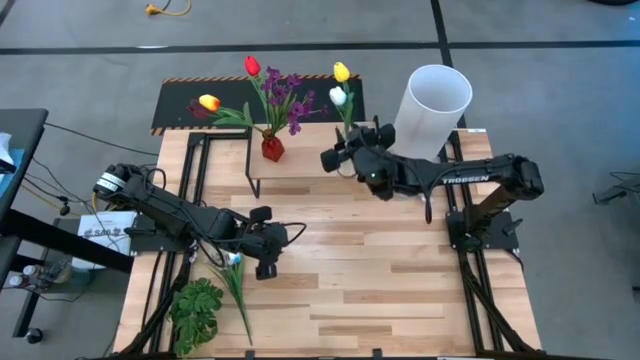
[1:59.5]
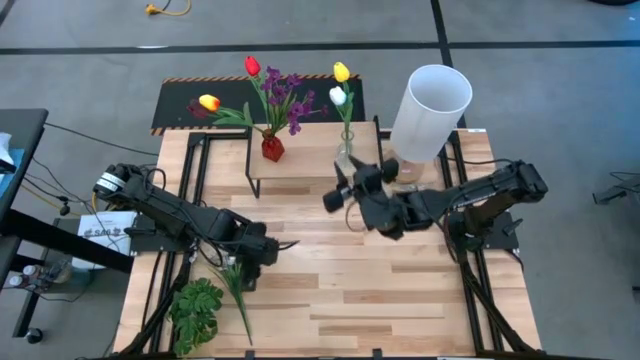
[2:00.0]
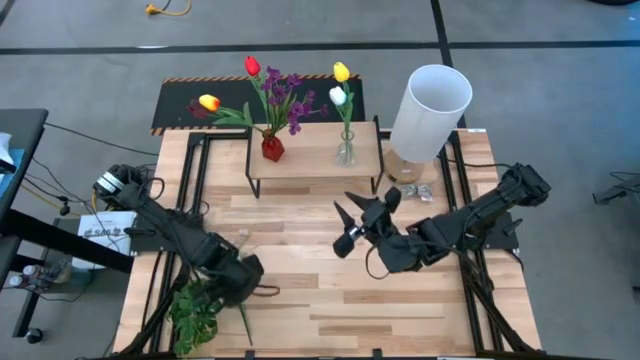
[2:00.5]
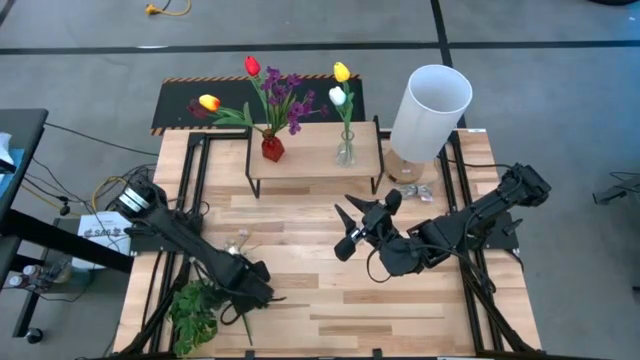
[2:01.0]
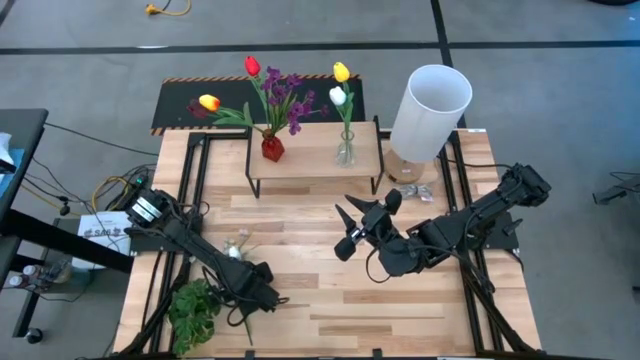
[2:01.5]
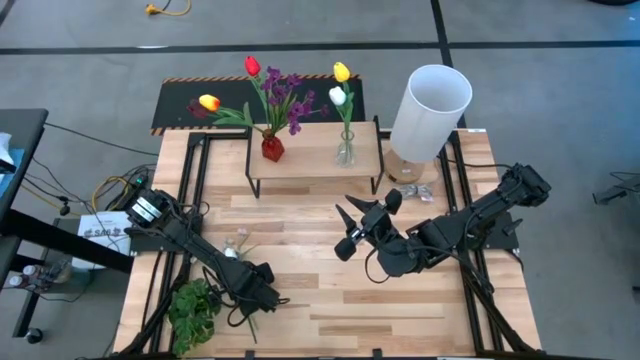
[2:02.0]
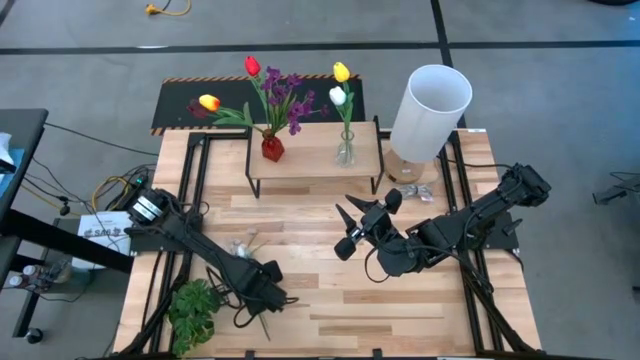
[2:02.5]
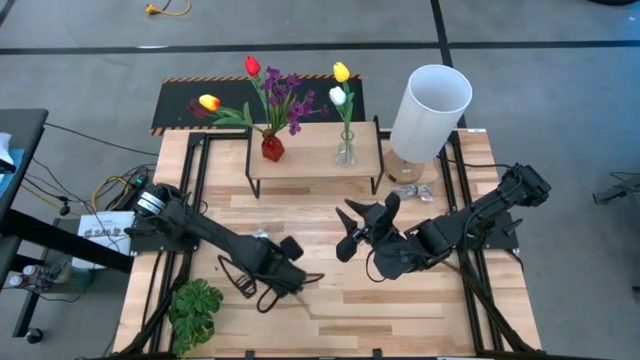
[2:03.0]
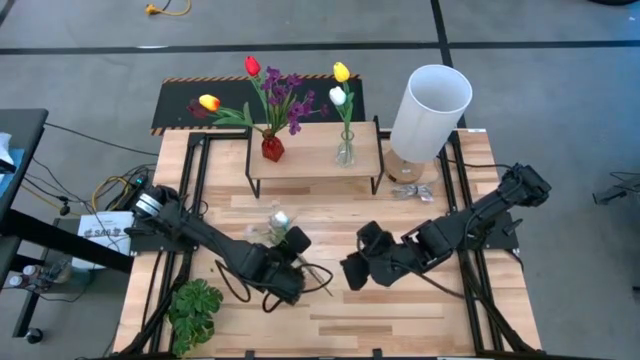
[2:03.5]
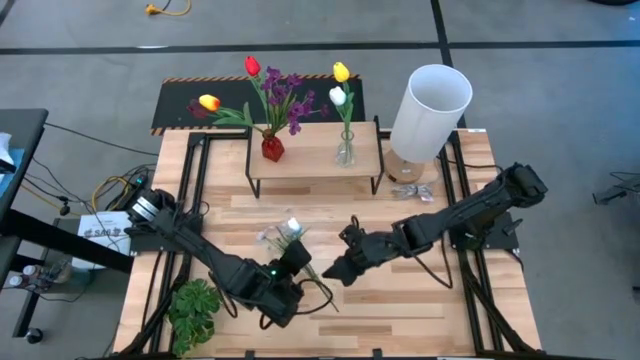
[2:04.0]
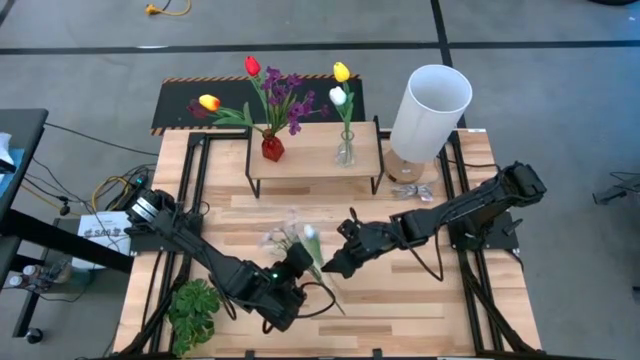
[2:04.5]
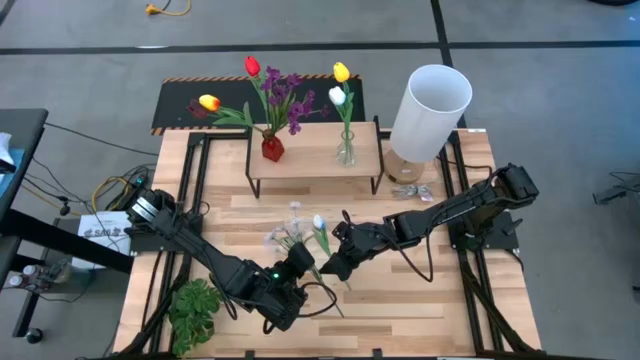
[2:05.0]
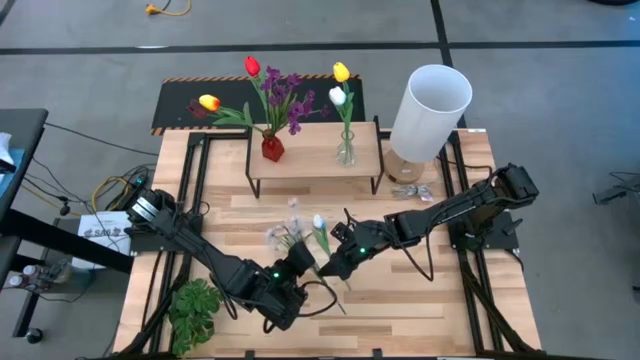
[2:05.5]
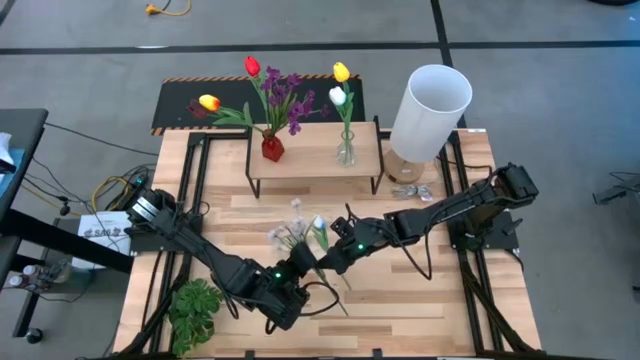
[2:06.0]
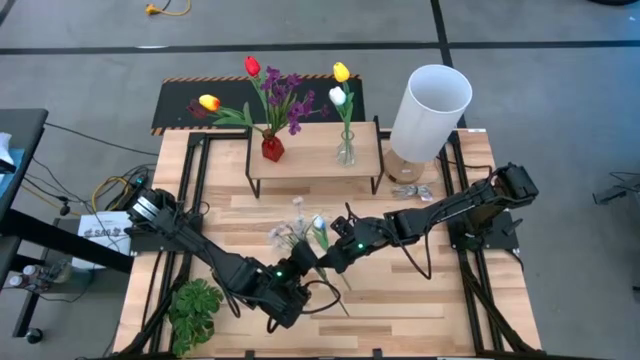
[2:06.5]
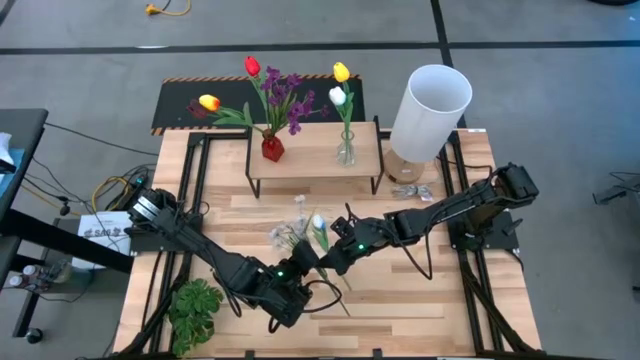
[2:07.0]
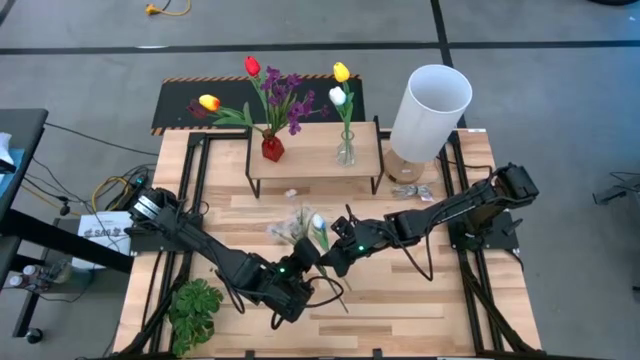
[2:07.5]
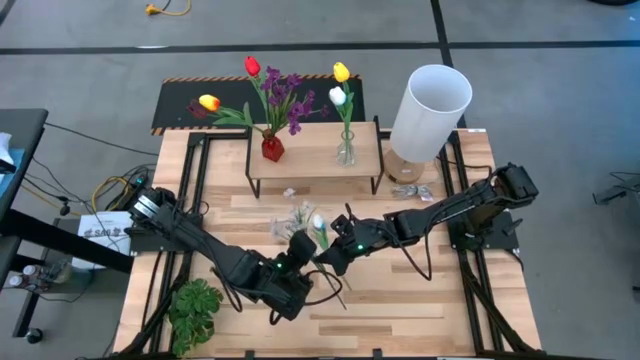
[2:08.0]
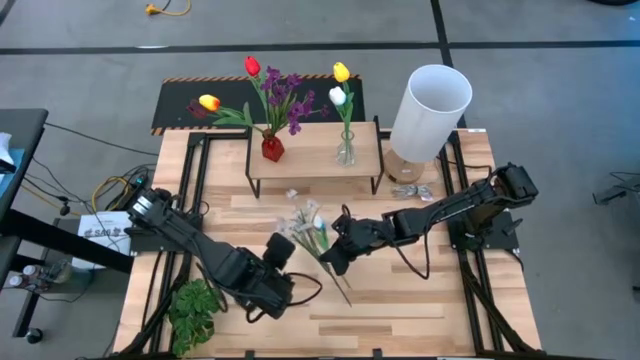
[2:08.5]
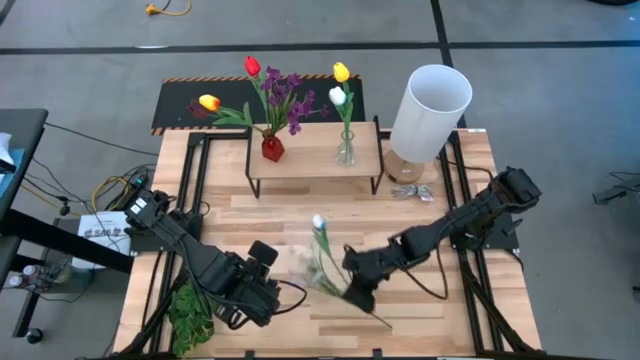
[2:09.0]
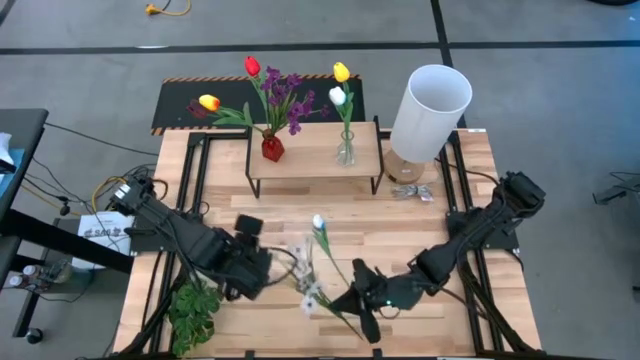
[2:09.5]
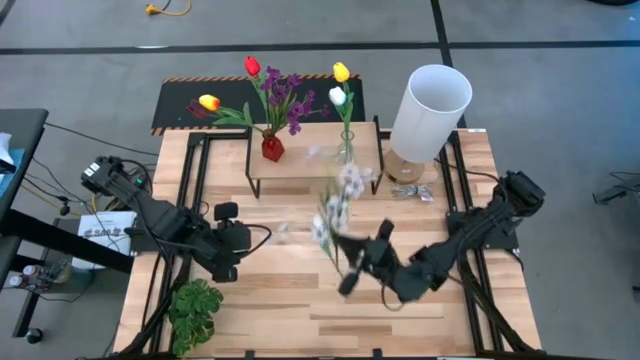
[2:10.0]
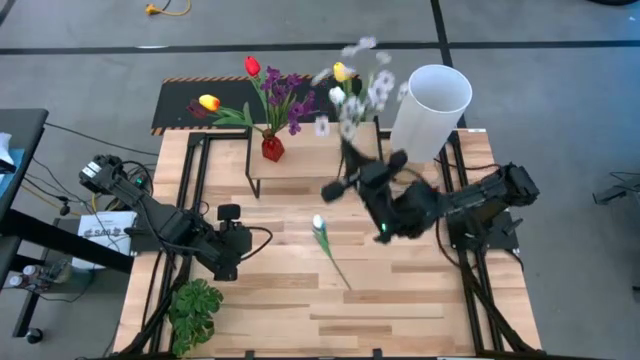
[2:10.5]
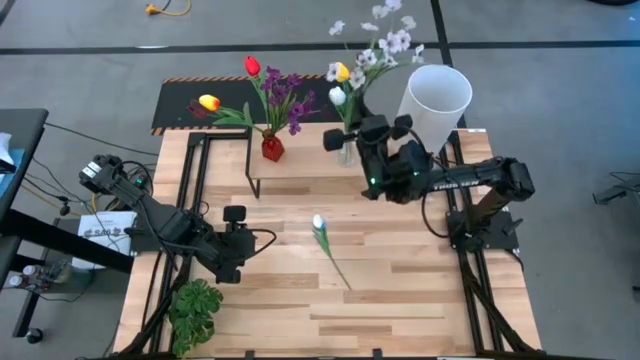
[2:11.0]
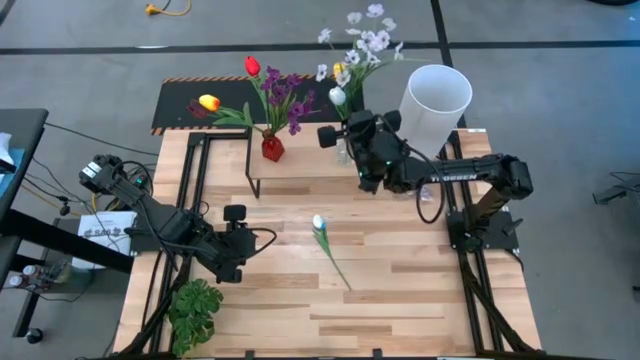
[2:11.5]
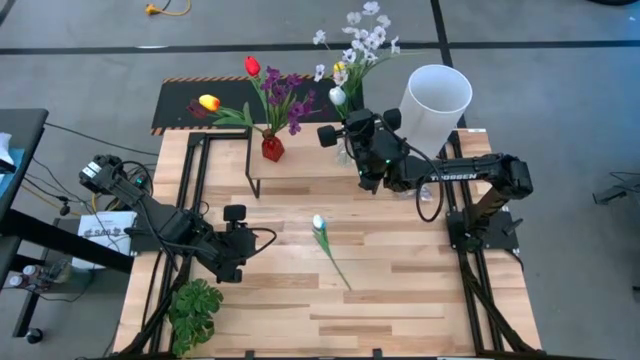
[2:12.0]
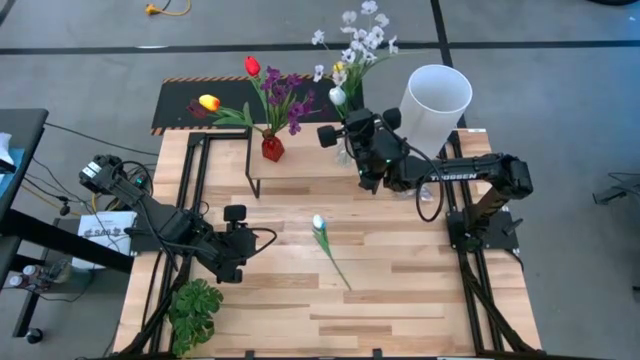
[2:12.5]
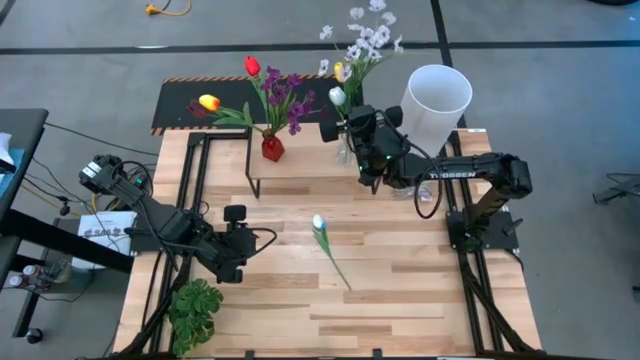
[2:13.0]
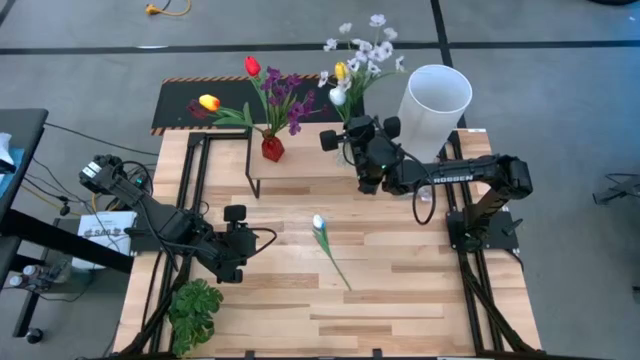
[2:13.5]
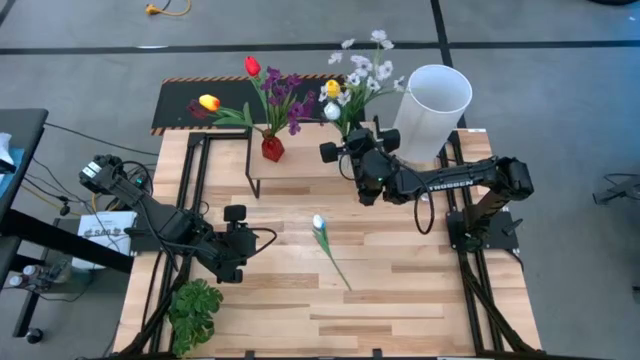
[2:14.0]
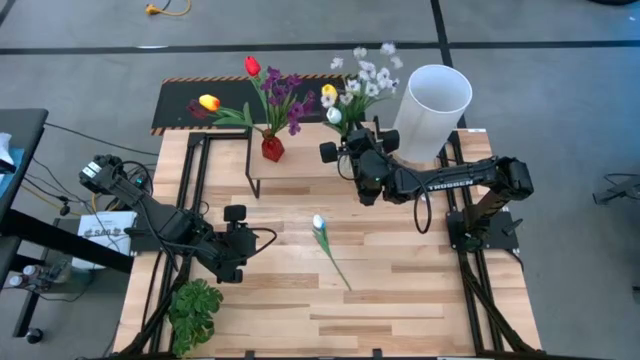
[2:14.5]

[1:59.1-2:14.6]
Task: Pick and place flowers into a vace then onto a shelf
Put the white flowers into the transparent vase on the shelf

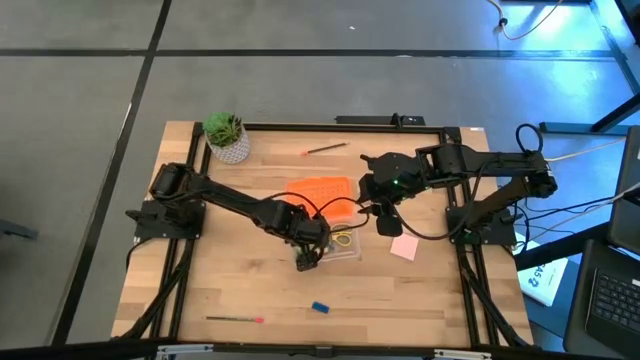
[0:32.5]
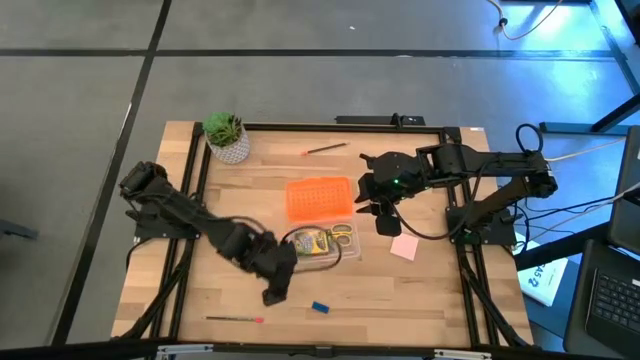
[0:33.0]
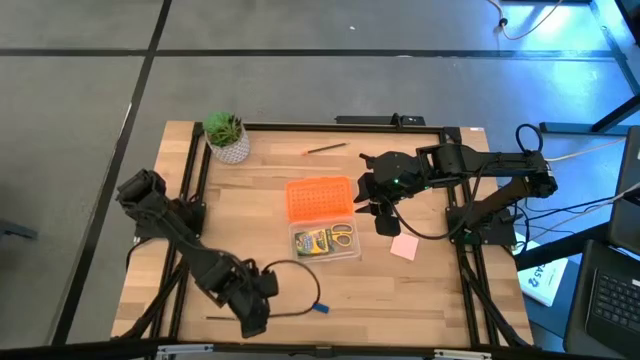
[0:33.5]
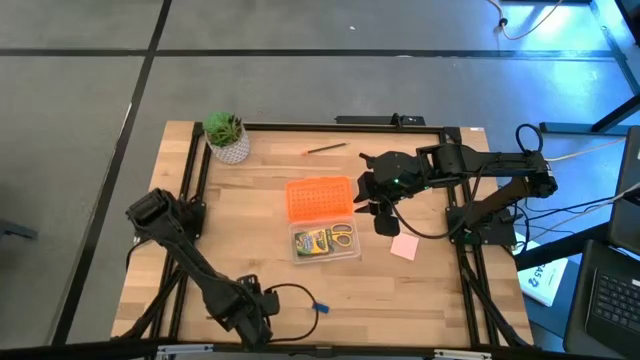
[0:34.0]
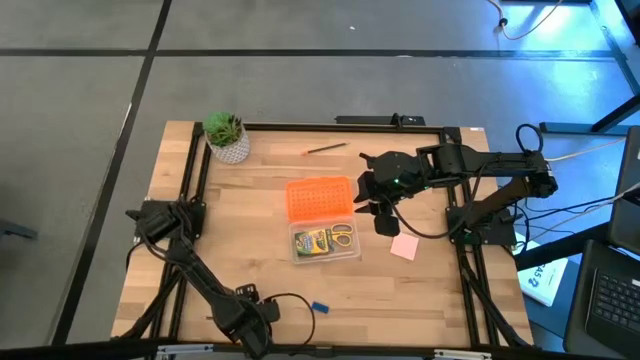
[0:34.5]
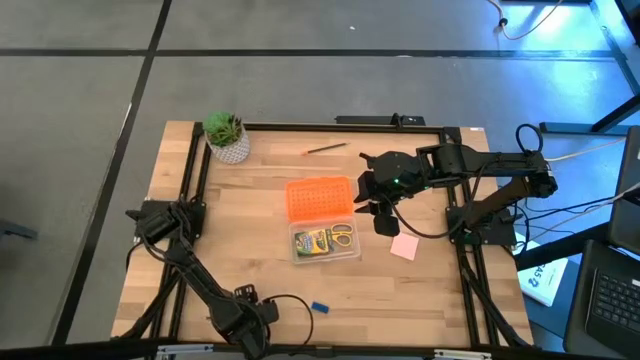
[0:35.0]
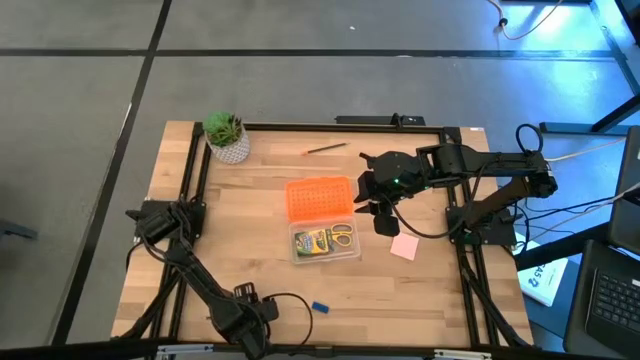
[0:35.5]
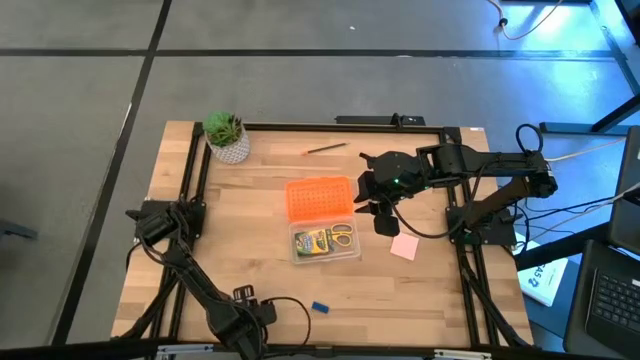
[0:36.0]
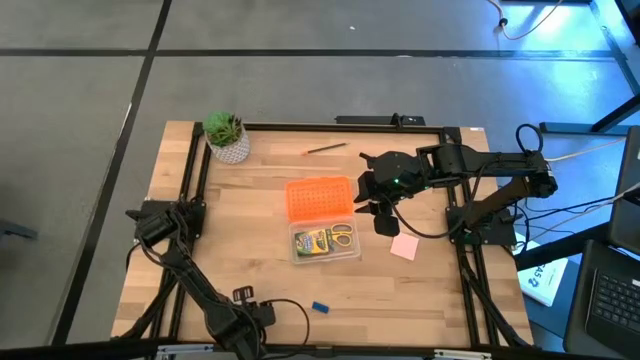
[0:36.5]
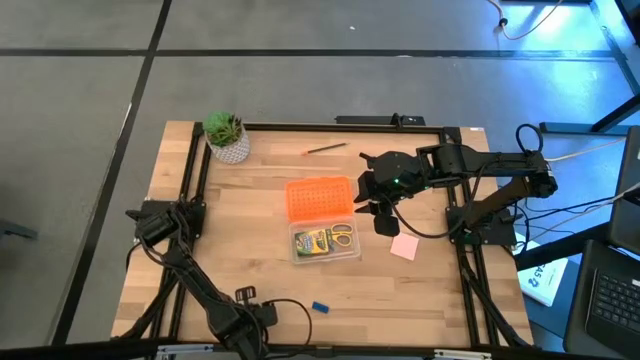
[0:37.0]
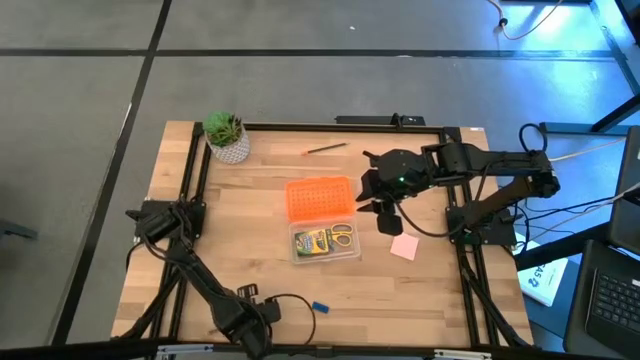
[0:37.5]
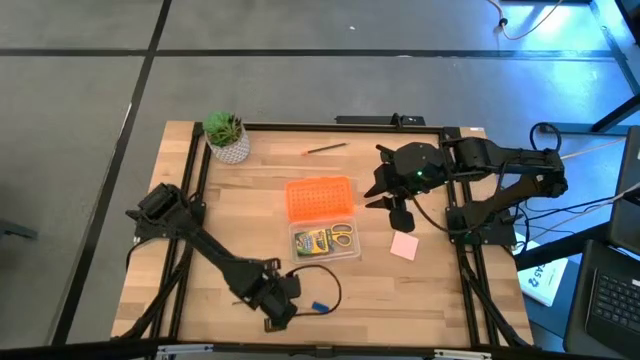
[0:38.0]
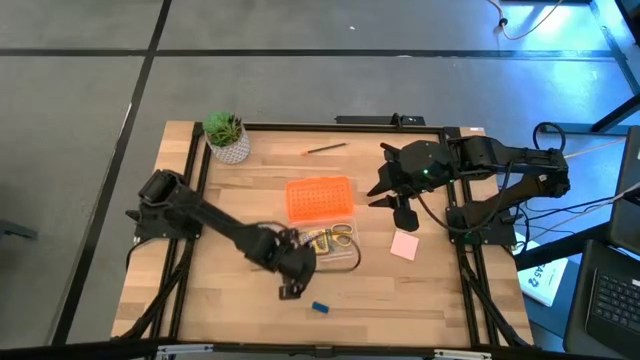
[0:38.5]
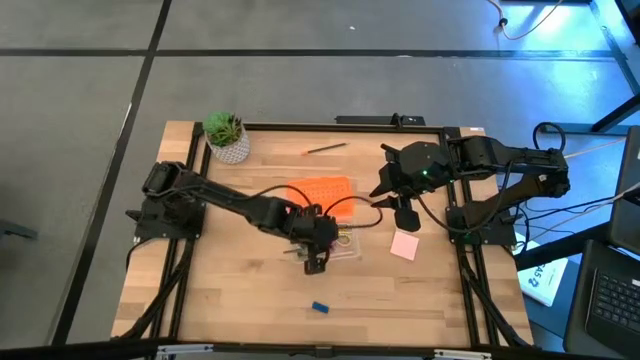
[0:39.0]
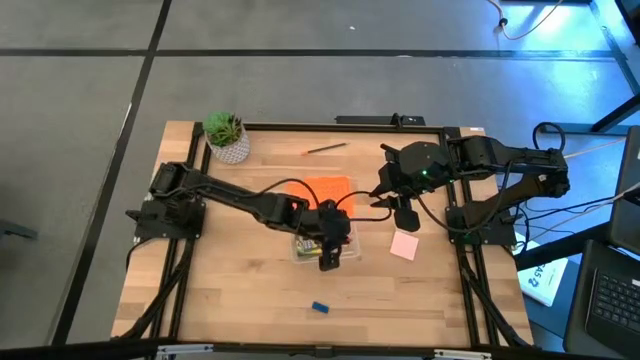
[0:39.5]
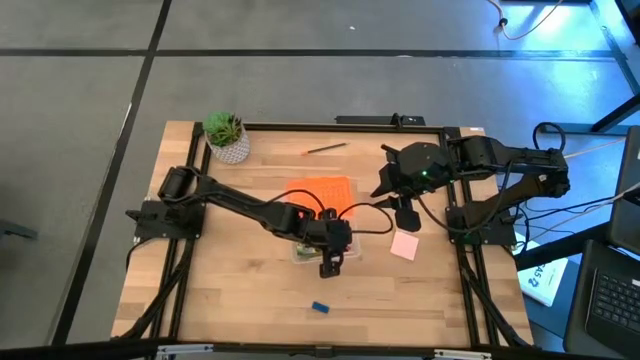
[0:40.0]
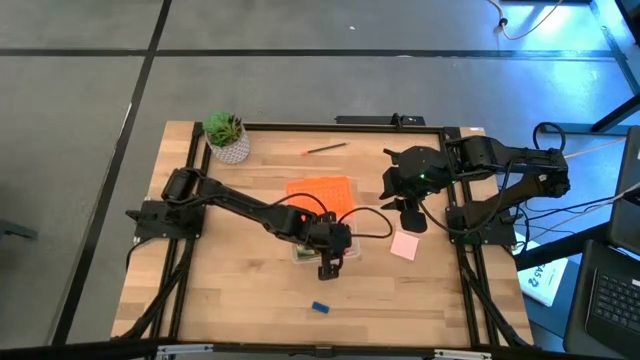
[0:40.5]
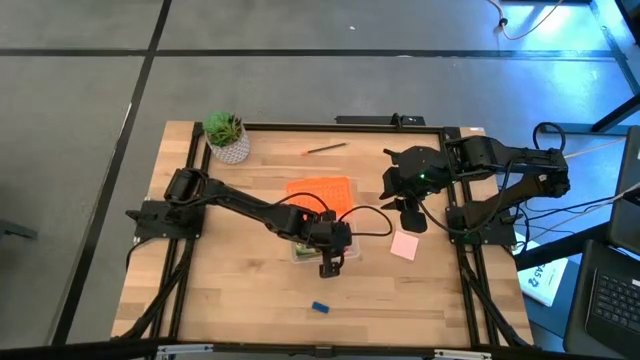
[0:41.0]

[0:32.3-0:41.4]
Task: Pack school essentials
Put the bottom black pencil into the supply box
